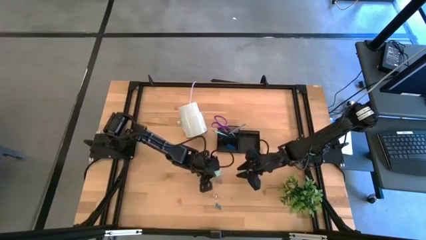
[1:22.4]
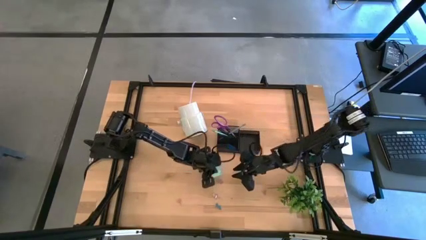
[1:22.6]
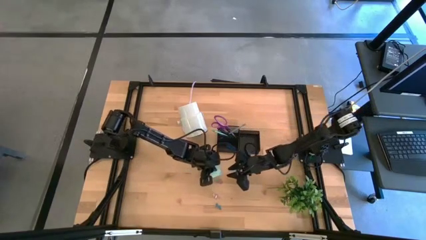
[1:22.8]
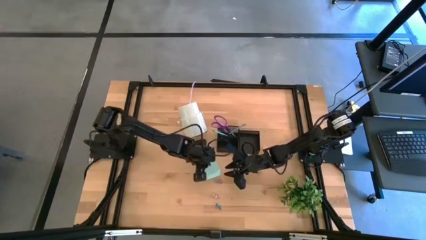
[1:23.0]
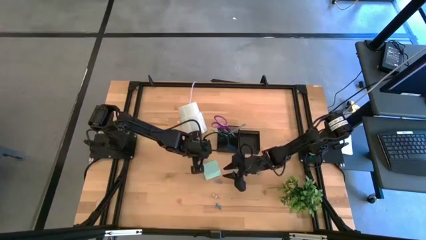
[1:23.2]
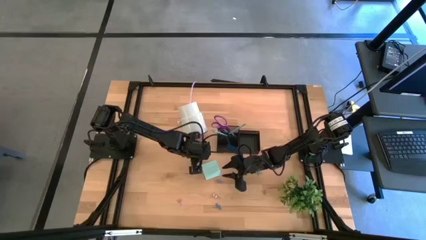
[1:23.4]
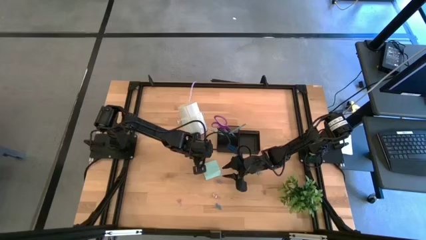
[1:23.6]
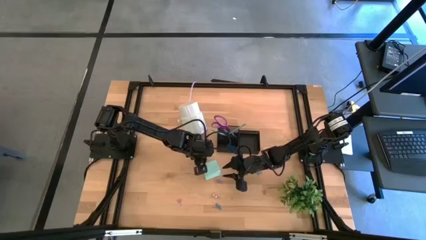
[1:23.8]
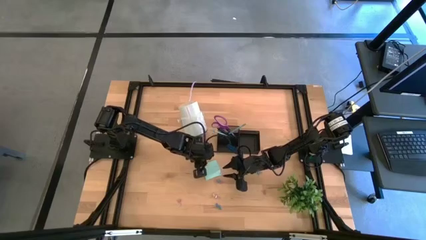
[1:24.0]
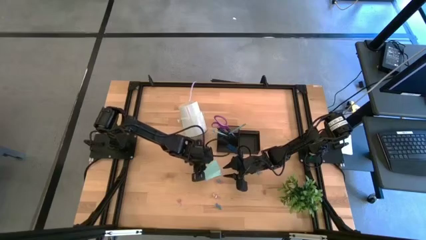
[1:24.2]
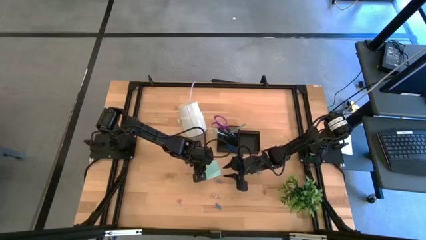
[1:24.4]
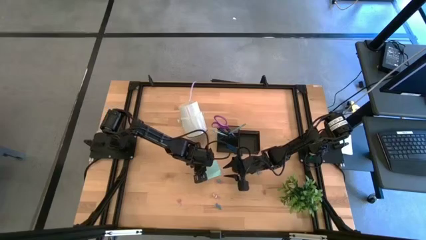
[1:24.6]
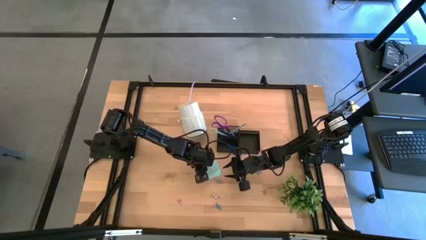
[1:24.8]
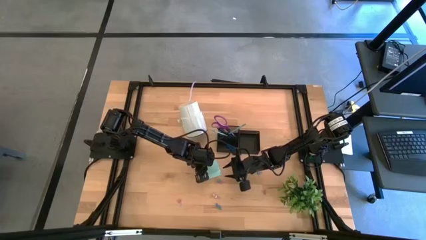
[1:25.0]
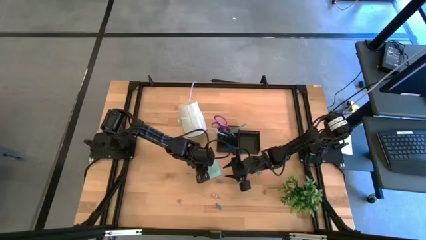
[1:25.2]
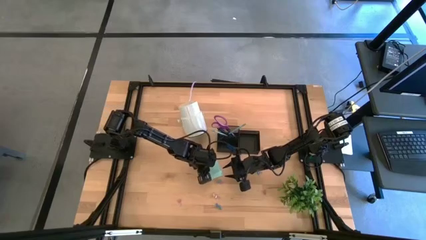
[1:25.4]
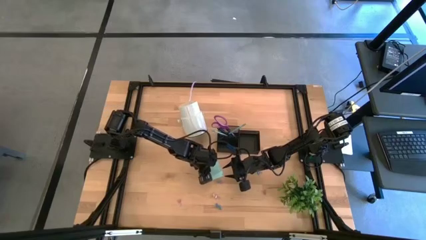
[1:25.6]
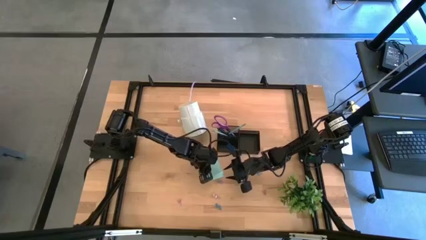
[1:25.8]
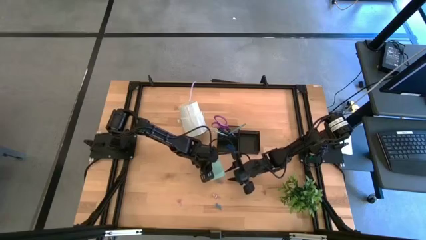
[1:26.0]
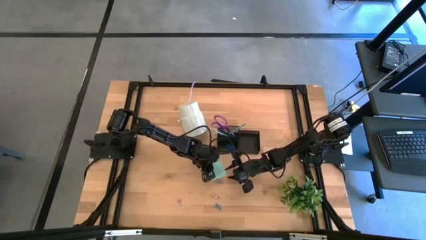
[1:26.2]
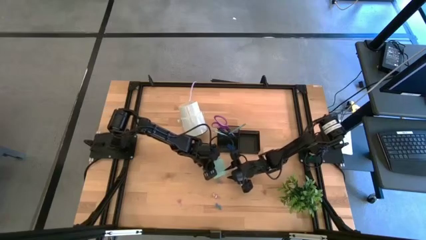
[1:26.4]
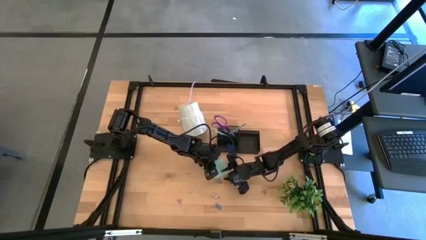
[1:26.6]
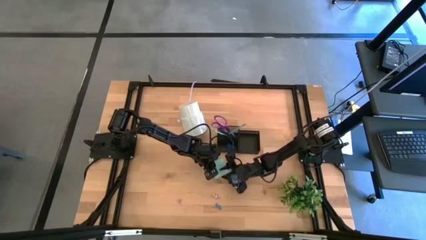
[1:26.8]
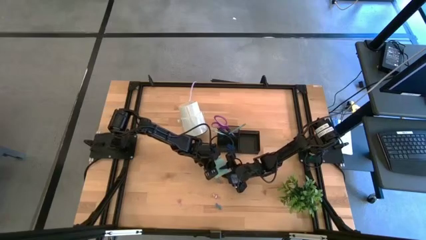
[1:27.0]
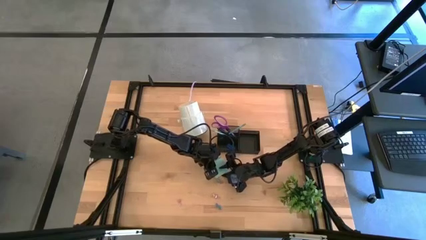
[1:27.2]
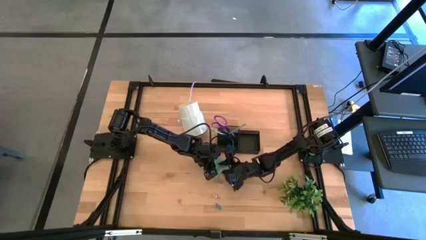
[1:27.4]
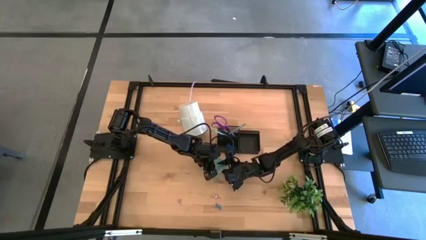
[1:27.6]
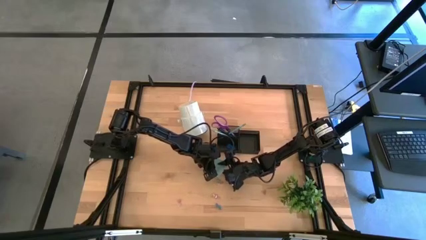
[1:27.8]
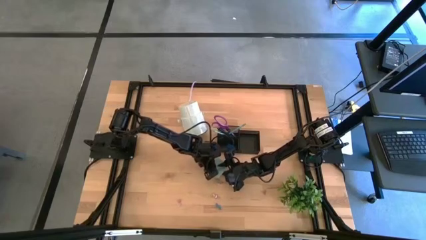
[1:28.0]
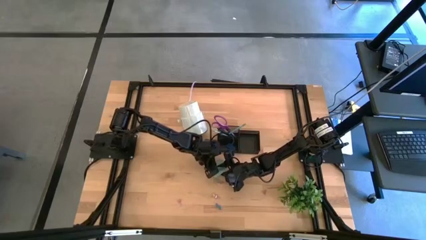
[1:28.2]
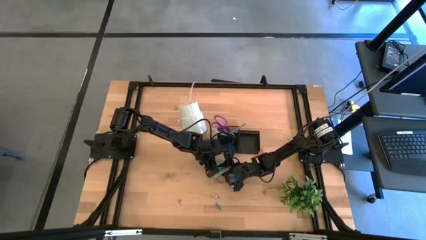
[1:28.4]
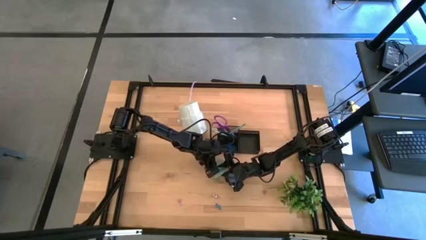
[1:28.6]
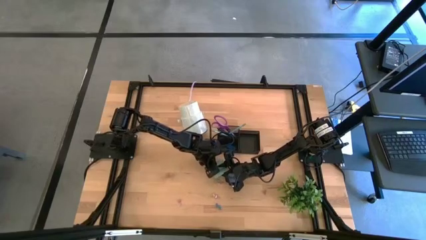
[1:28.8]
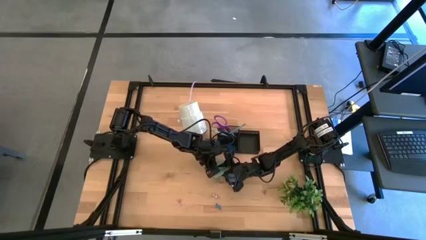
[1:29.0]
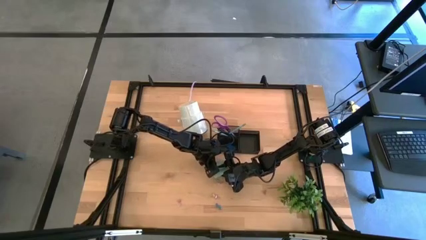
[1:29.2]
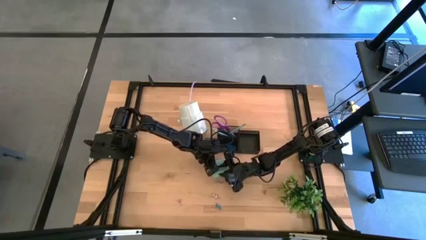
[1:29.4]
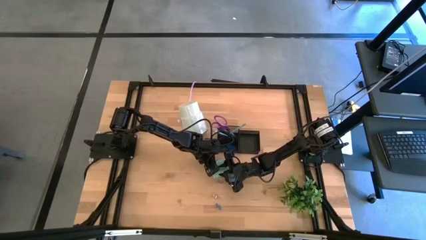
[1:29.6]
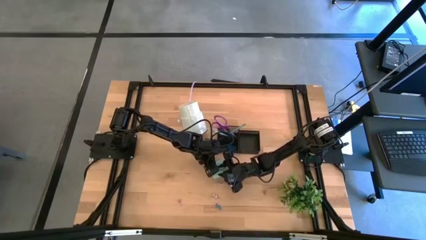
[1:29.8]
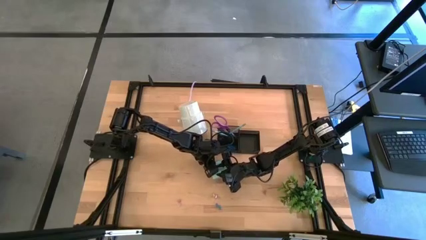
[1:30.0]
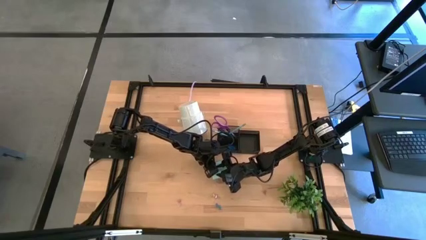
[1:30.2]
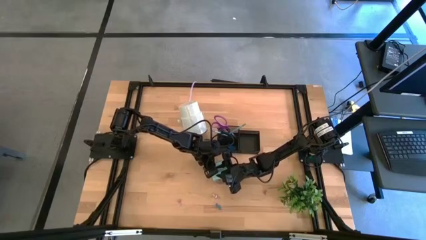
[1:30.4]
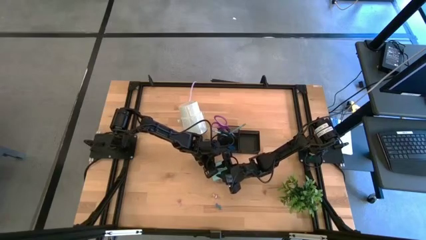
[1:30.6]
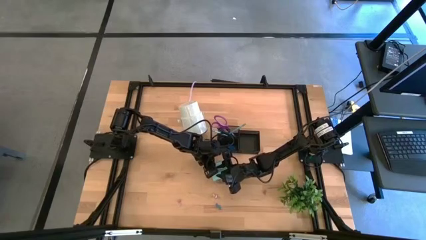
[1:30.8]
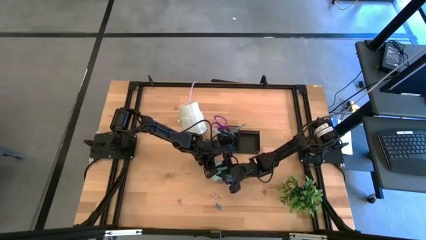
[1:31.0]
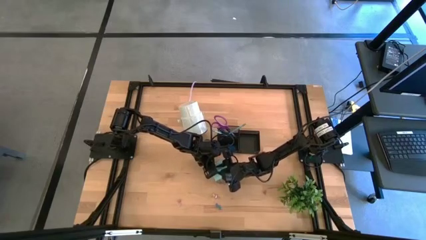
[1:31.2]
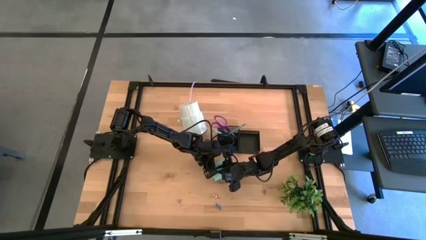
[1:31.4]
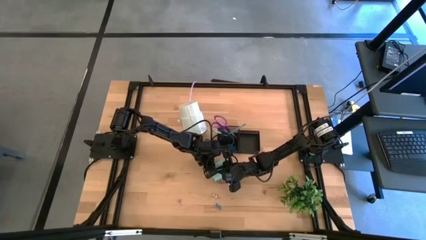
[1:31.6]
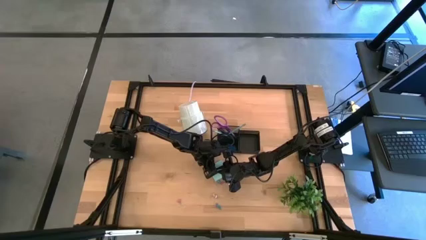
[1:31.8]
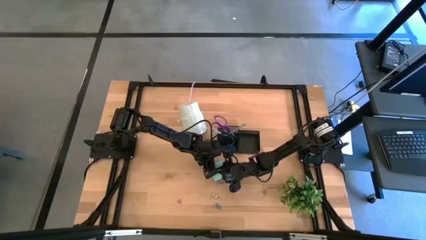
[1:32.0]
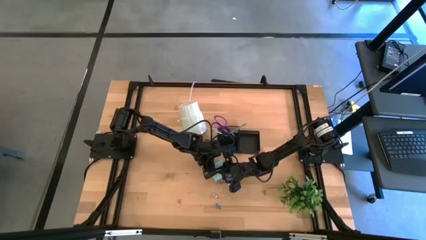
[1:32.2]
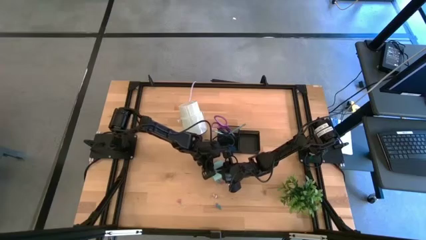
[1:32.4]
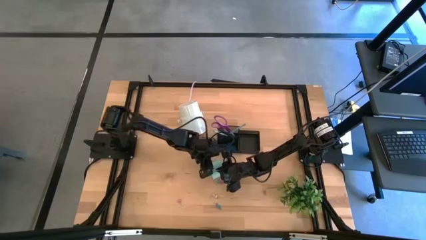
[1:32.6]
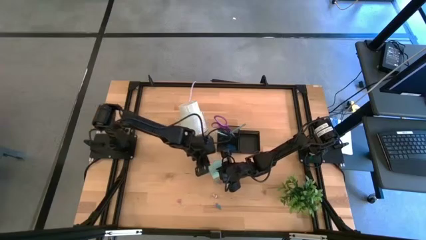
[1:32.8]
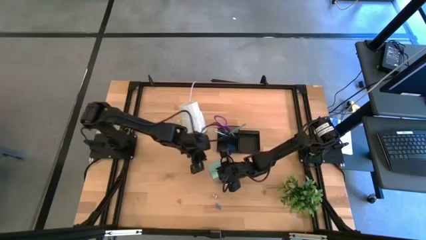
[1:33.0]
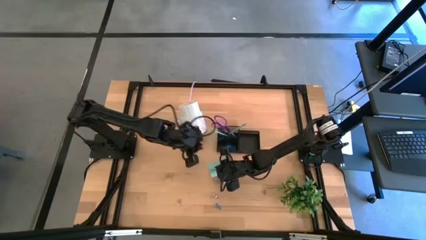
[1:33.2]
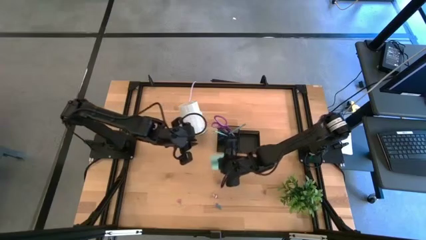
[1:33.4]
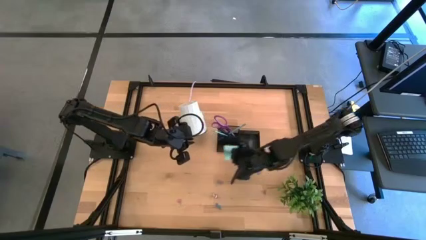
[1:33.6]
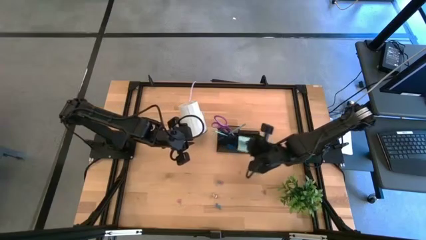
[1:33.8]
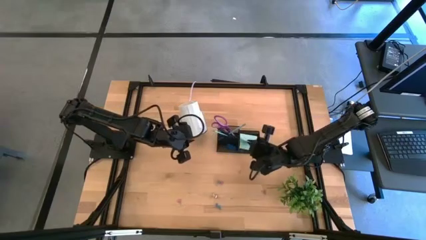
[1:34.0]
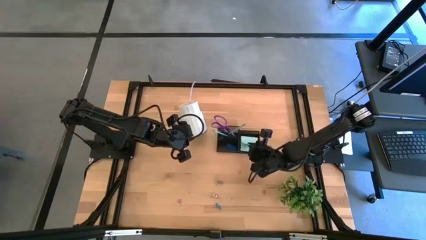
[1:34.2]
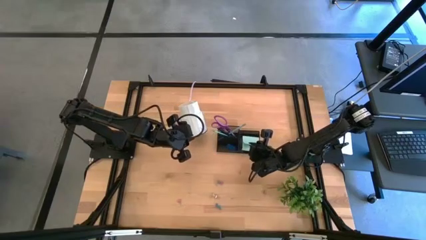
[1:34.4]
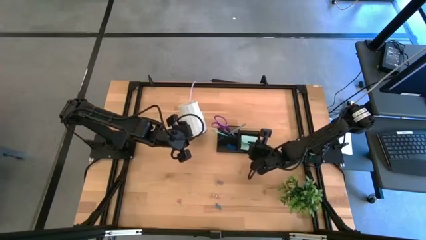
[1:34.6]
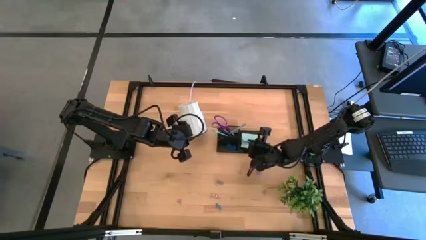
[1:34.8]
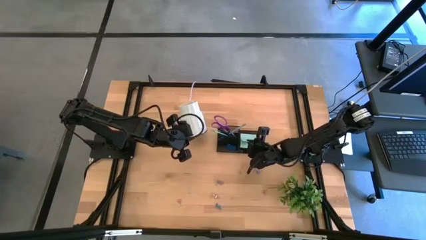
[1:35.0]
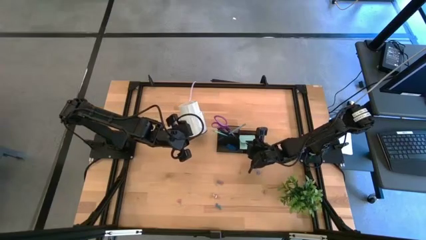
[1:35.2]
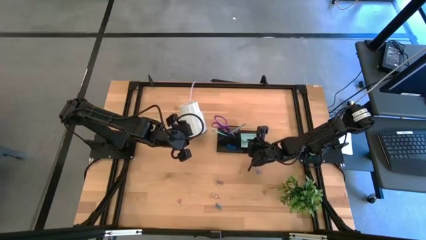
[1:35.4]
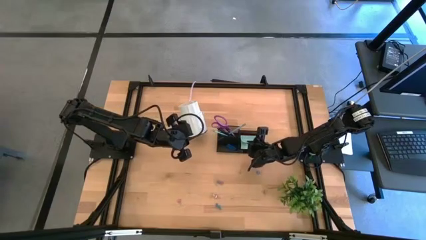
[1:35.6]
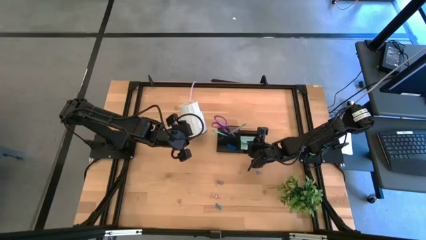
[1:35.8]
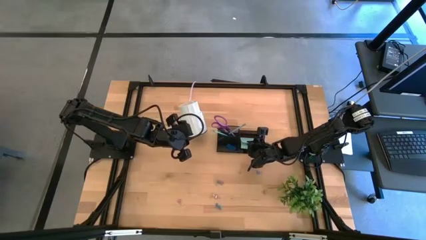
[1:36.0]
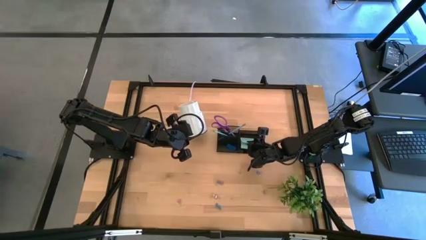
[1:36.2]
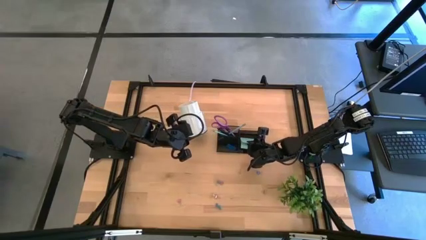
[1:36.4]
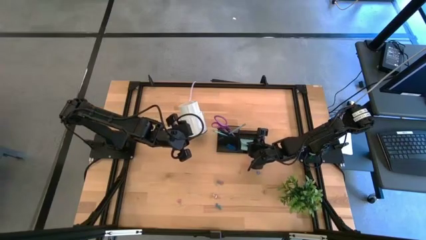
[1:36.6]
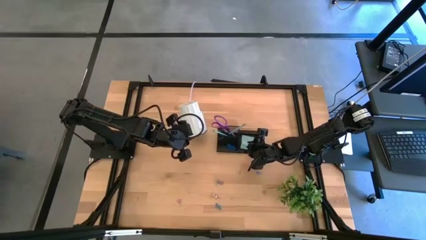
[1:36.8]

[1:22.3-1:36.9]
Task: Pick and place office supplies into organizer
Put the blue sticky notes into the black desk organizer

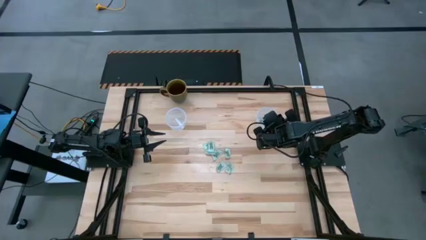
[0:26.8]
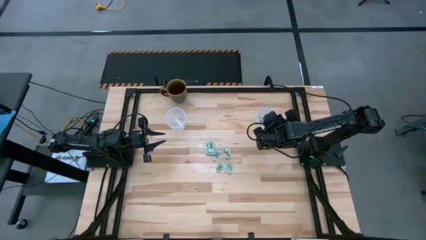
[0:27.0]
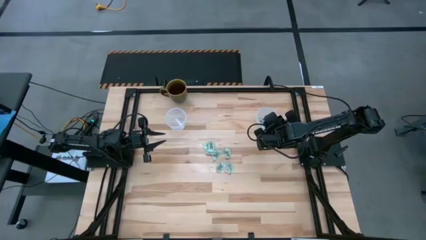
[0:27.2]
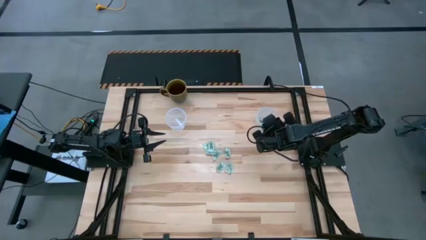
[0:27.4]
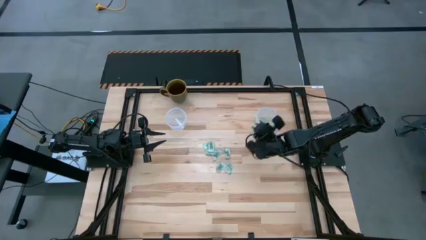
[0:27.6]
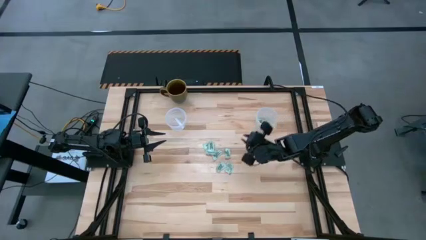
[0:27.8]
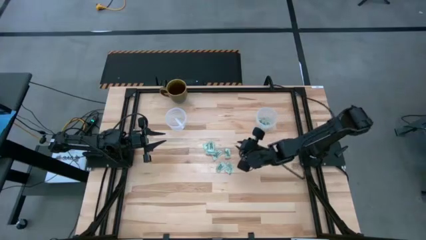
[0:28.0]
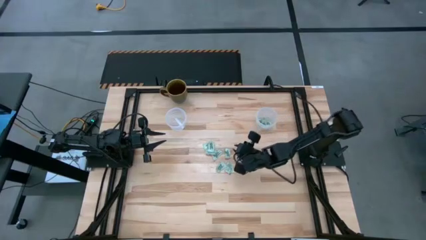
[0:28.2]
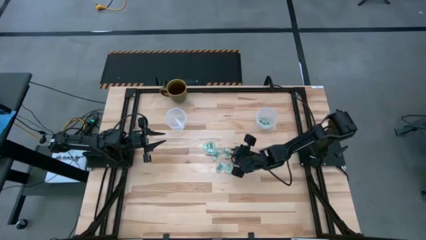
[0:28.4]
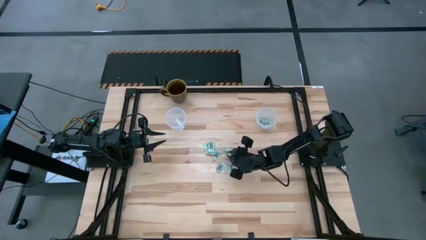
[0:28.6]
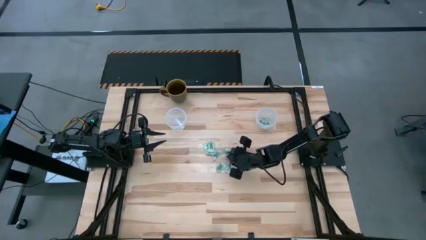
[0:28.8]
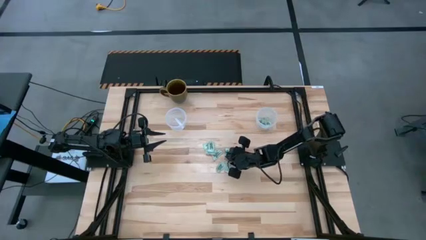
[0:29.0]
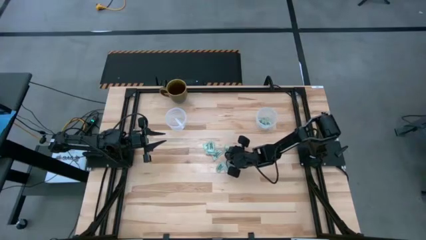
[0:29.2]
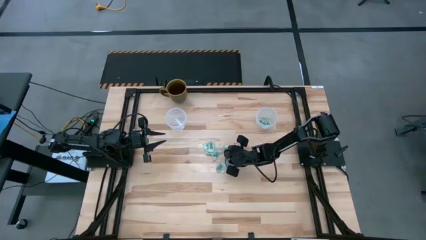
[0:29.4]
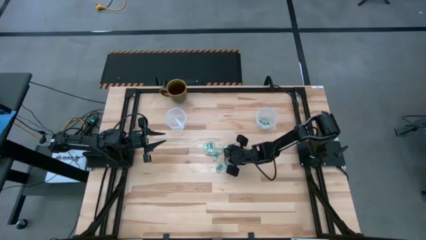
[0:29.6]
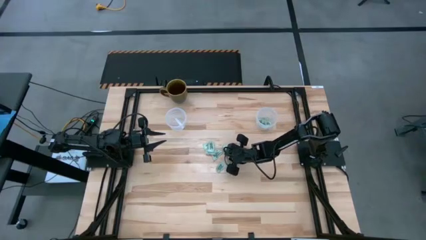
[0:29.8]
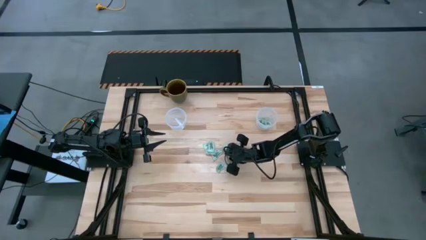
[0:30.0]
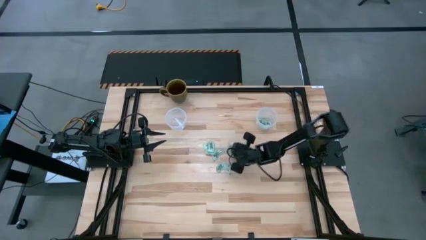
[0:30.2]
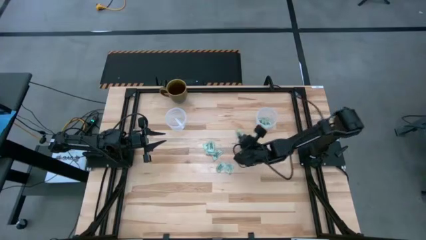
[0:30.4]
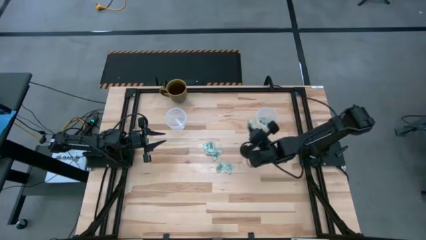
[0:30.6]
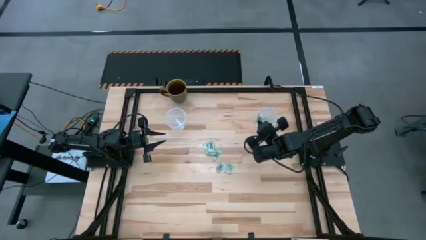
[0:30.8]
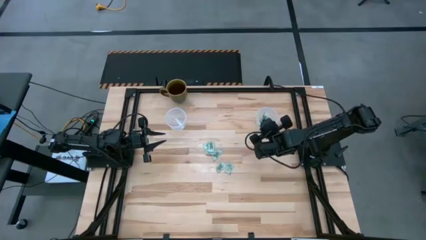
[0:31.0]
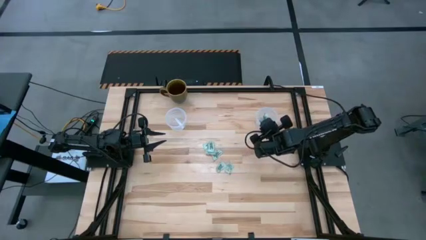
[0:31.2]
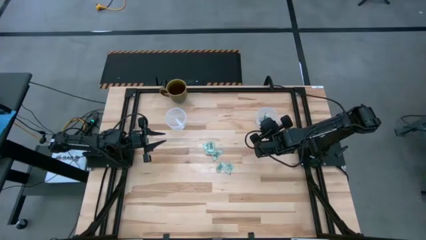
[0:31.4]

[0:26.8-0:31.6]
Task: Pick and place items into bin
Put the stevia packet into the right transparent bin
